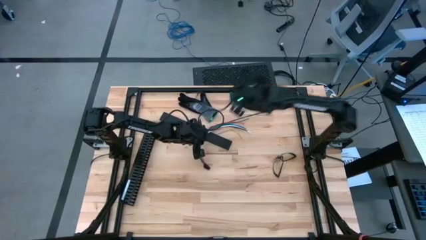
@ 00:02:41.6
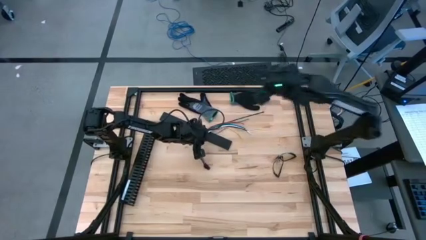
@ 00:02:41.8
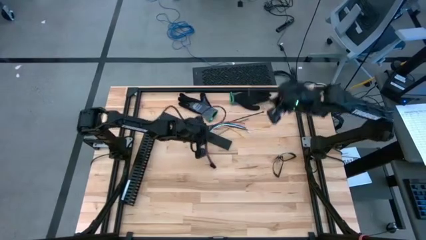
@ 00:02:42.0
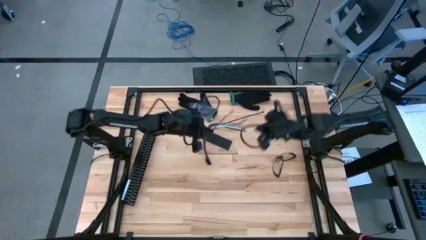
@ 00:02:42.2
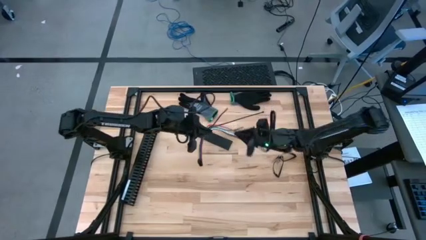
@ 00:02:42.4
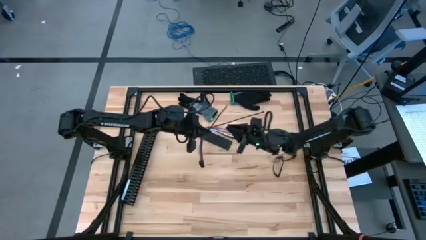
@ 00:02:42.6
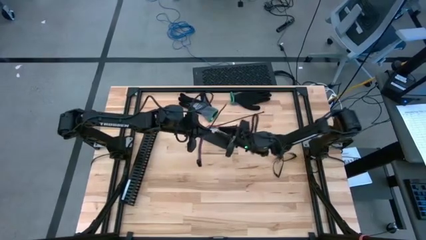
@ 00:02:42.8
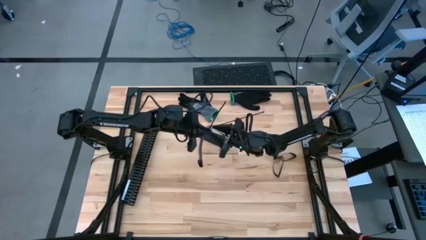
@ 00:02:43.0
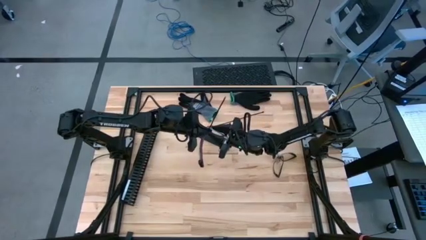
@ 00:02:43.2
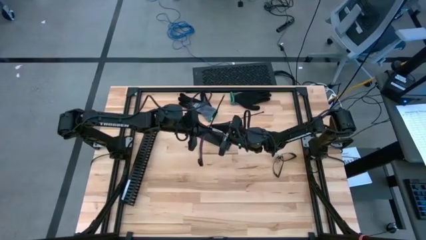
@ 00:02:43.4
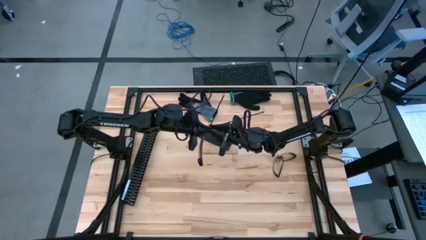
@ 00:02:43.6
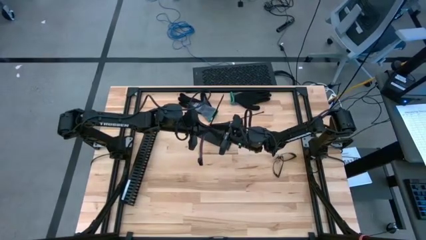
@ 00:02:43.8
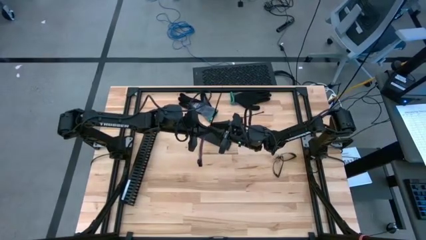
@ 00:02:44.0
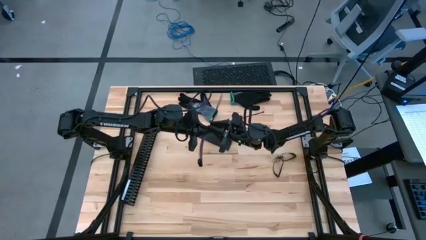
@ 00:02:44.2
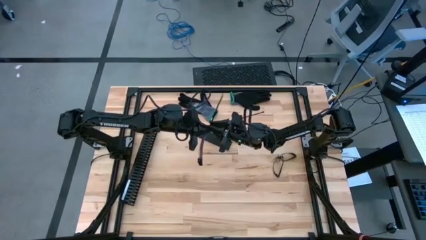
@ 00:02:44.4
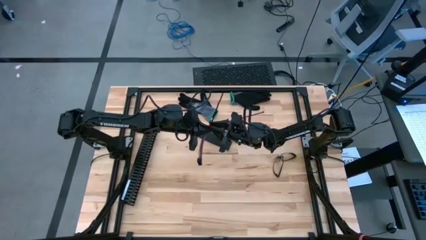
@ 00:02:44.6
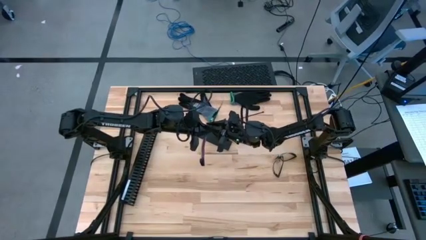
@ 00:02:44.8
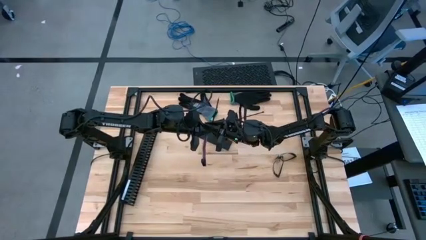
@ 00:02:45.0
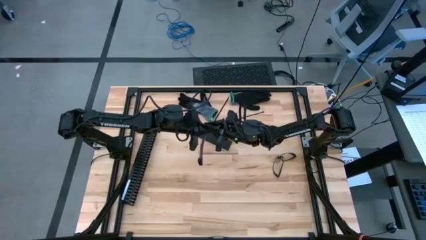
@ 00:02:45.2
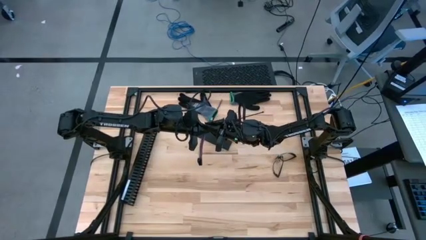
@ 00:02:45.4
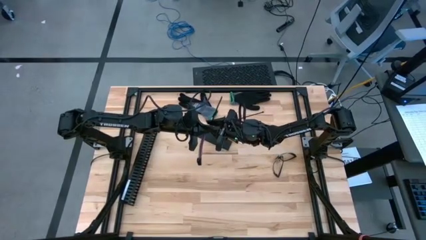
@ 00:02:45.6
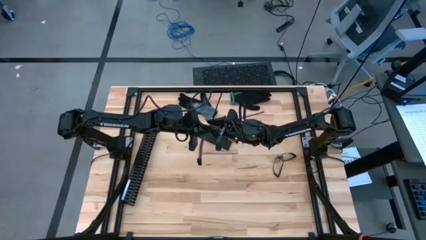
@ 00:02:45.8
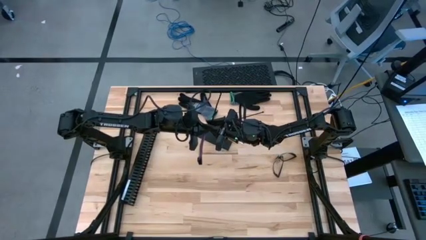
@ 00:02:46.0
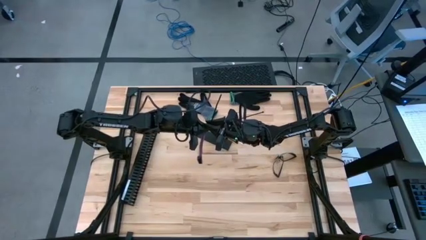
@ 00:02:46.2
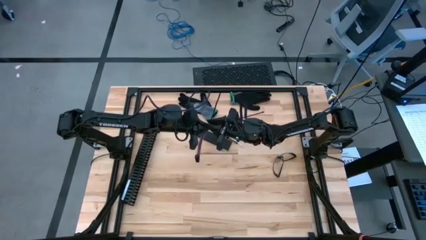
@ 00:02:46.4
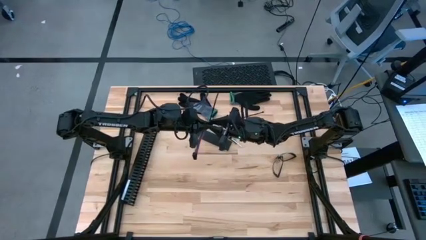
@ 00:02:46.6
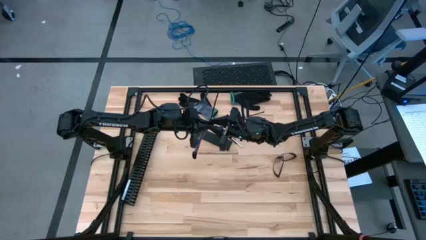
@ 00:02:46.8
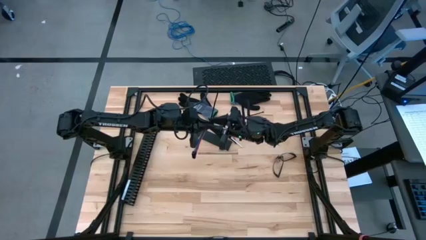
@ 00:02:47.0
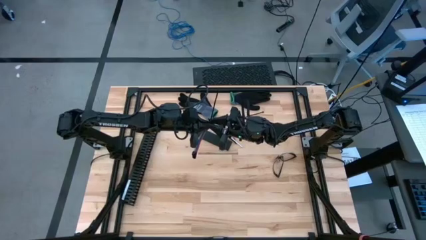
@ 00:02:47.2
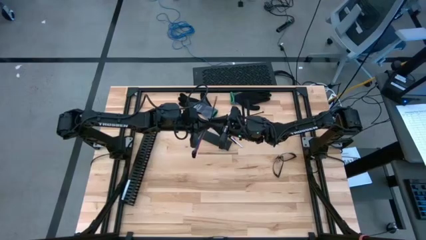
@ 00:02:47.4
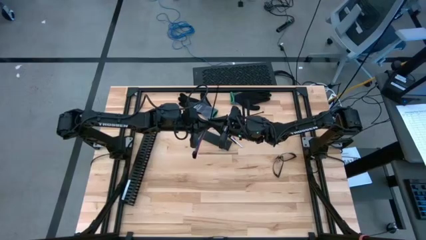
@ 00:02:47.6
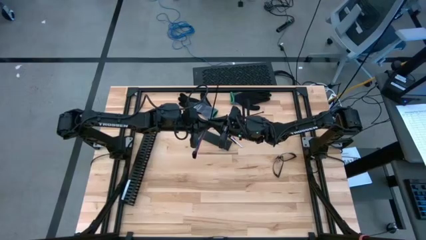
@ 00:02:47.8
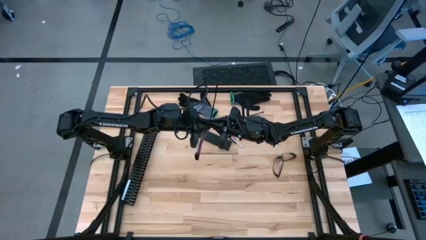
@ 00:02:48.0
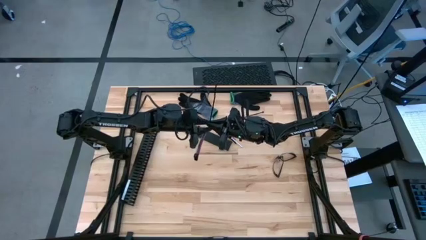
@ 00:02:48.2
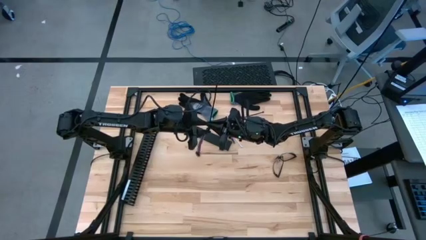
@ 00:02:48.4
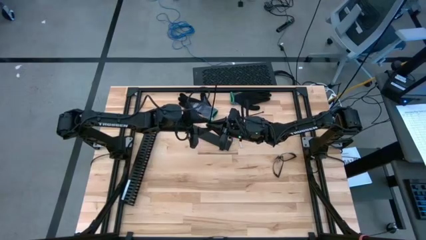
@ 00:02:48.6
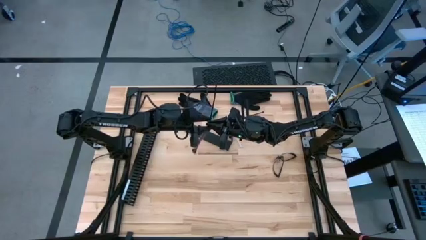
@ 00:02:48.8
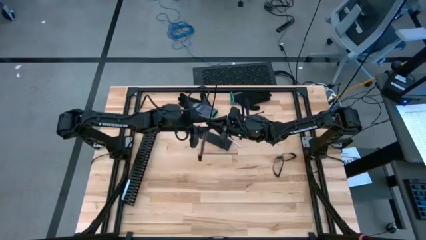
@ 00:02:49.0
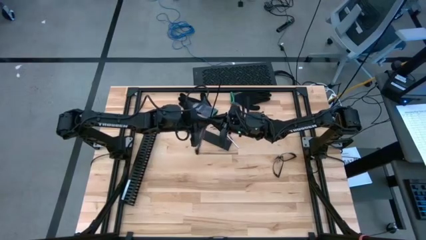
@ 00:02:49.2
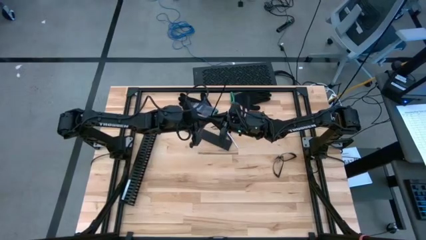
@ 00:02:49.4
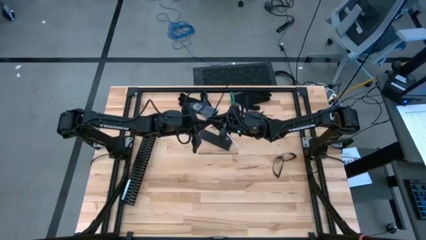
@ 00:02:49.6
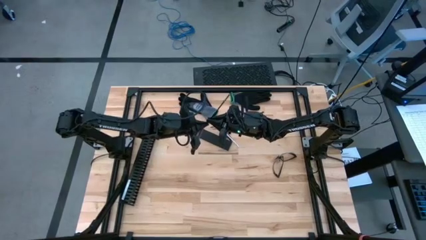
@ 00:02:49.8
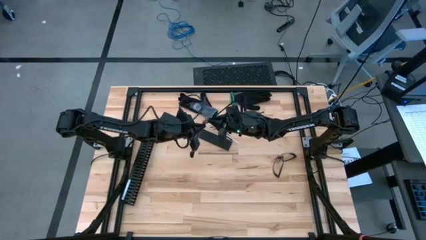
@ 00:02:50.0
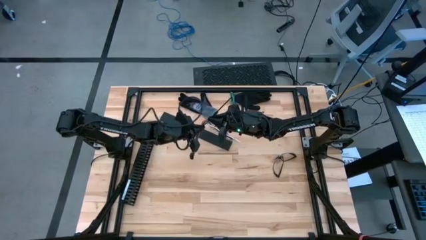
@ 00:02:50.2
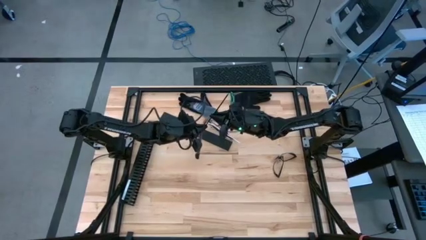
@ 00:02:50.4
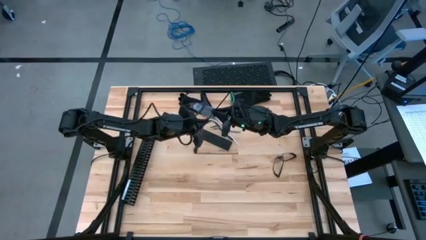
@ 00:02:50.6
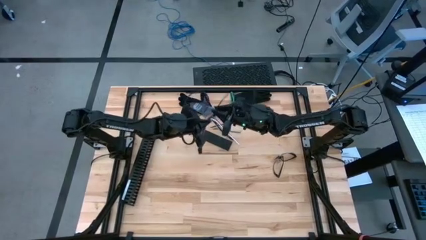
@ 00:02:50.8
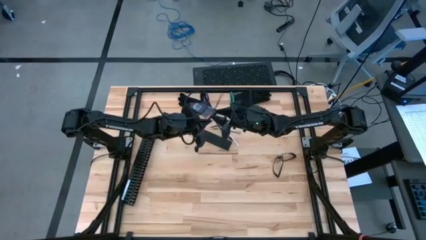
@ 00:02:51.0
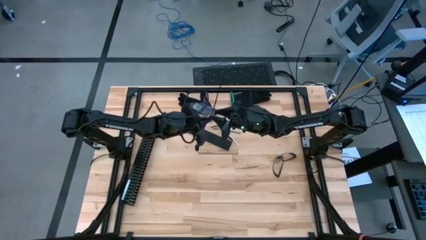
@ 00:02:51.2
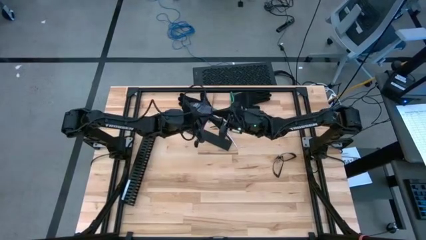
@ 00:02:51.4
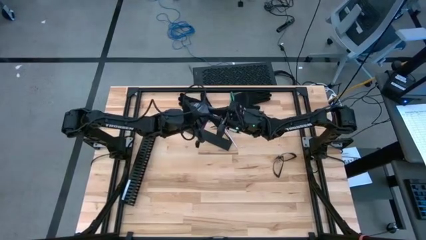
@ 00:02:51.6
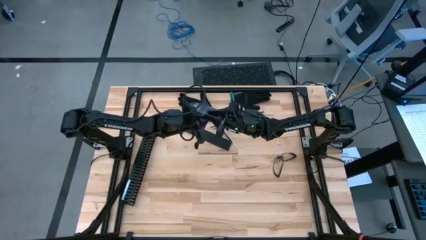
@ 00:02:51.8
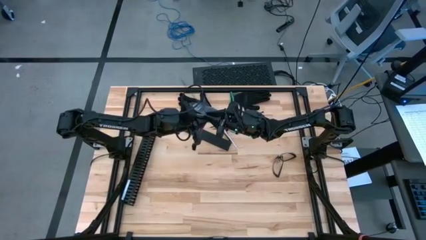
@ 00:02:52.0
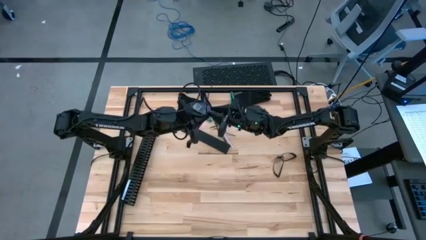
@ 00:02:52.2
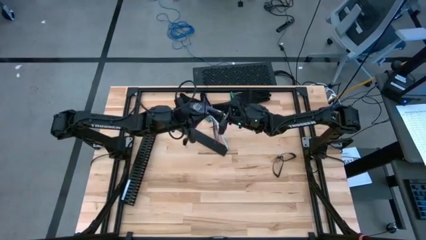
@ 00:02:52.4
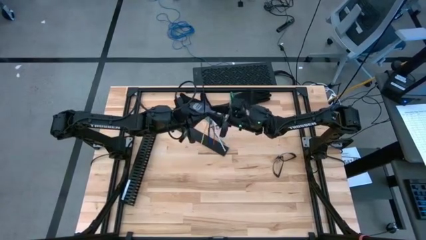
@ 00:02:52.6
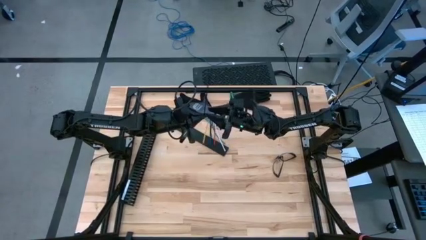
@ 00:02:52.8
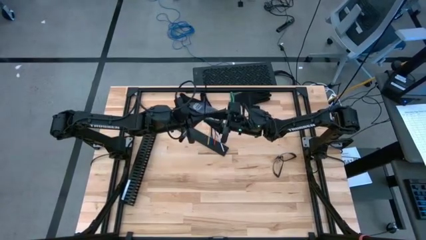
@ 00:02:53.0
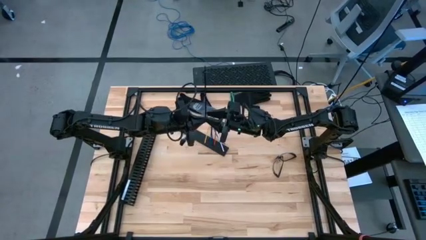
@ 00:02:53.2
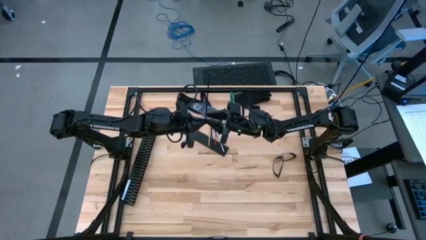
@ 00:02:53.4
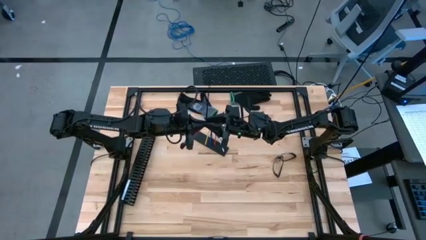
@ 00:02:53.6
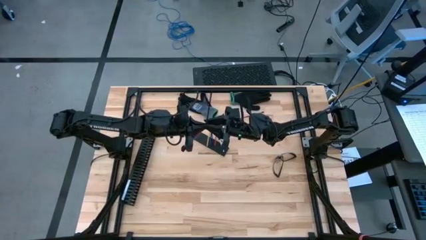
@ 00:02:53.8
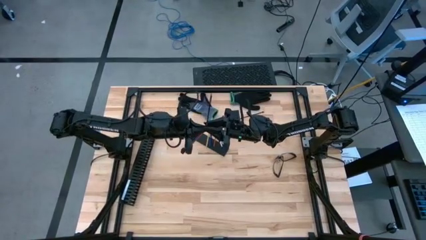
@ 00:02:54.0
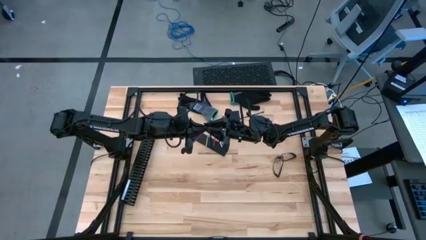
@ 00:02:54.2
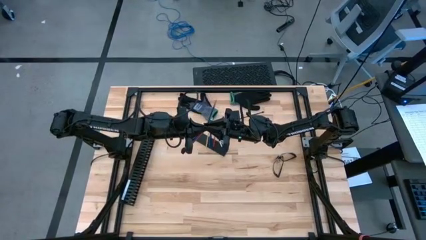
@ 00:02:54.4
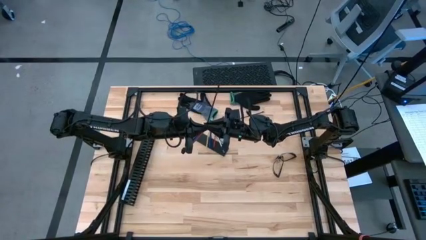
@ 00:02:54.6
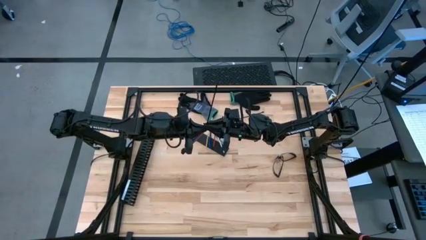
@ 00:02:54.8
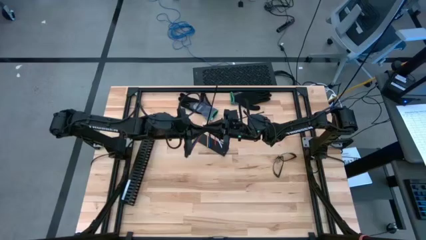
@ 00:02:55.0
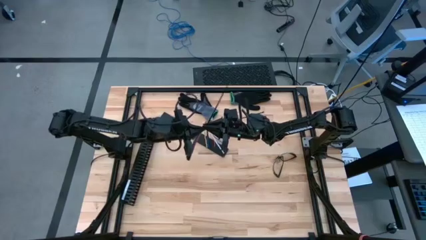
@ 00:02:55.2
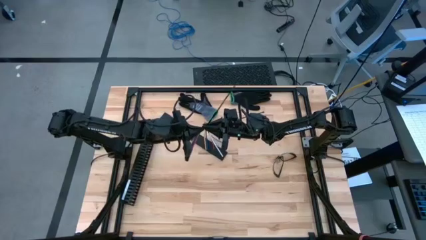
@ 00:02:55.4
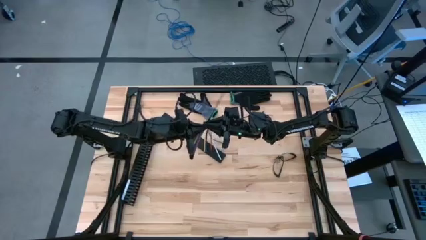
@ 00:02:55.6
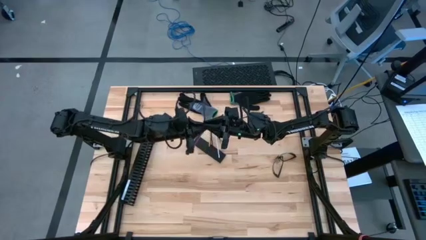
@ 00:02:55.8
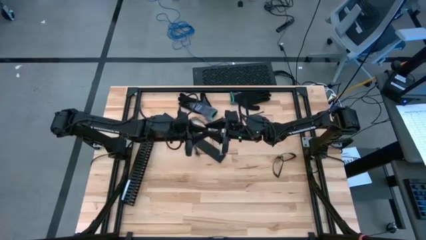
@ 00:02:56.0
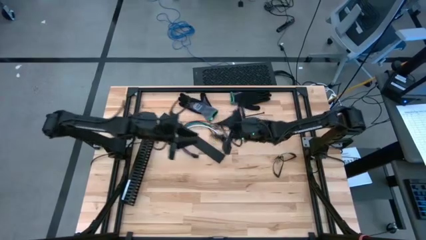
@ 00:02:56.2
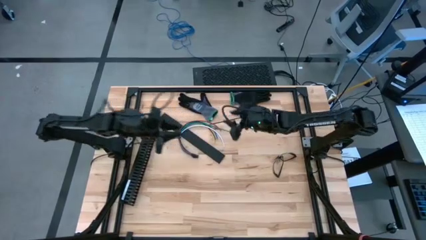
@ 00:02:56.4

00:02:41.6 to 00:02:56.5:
Task: Ziptie cables
Wrap the cables using a black zip tie
